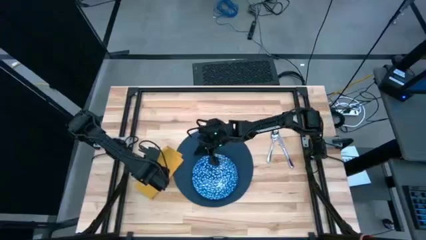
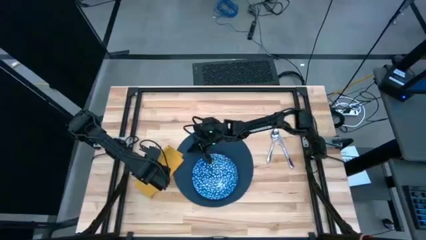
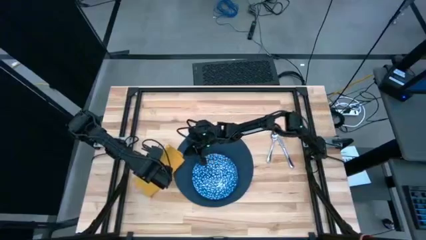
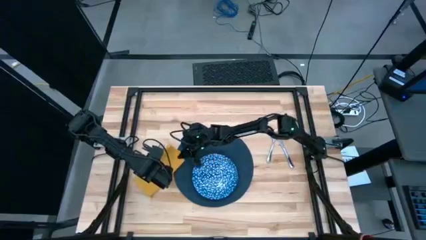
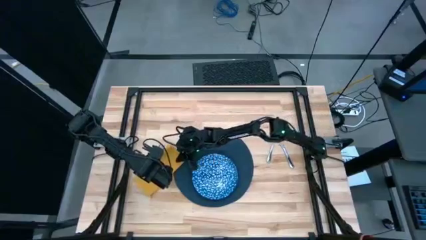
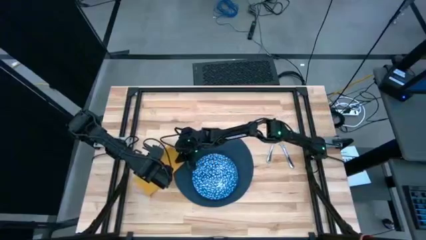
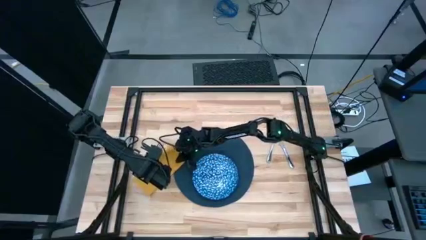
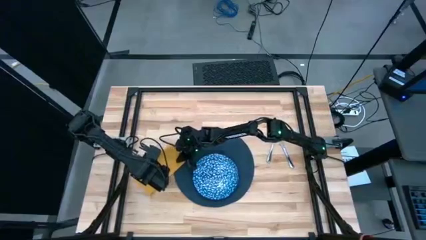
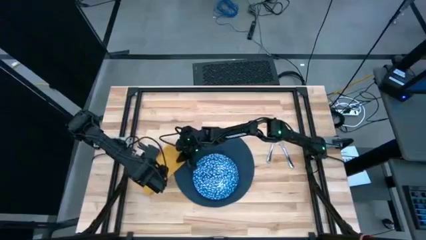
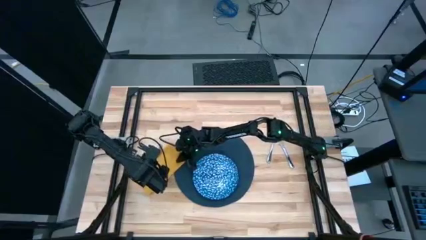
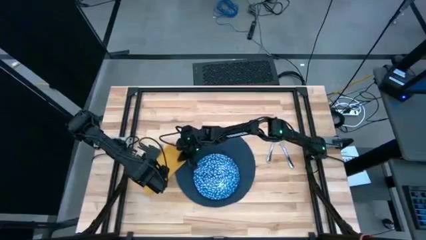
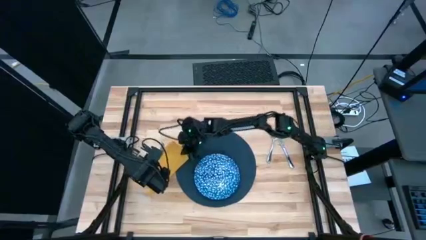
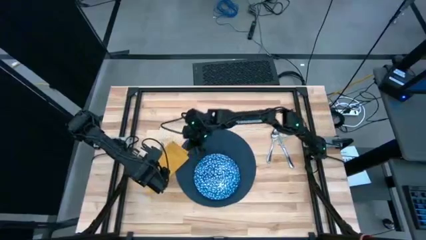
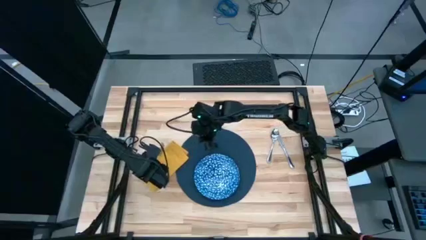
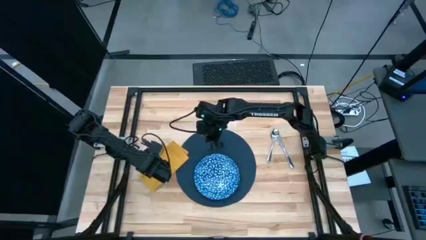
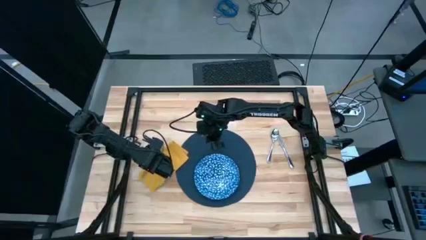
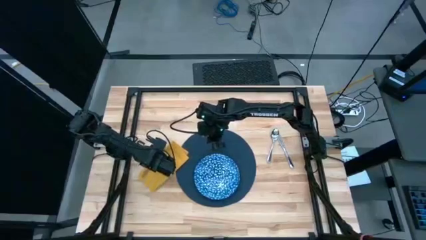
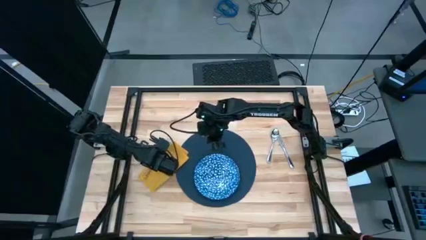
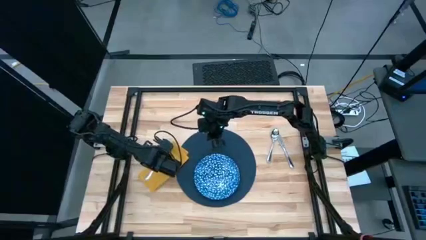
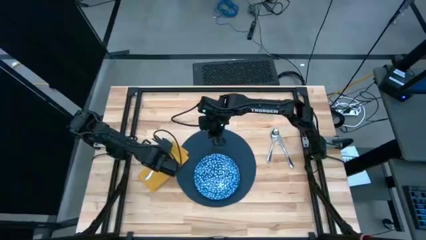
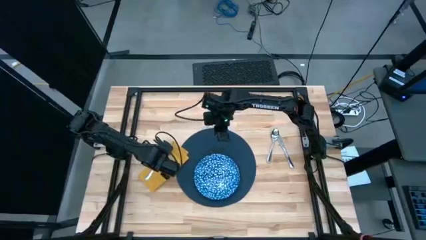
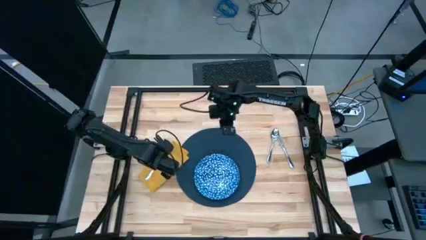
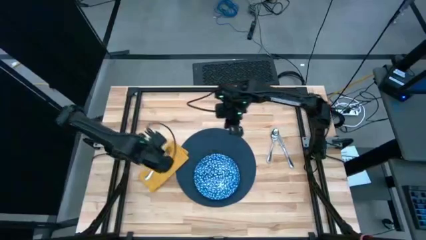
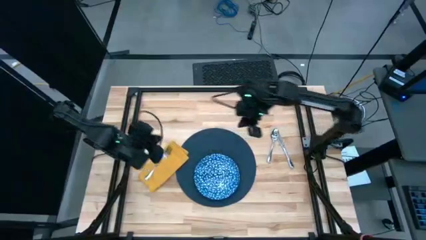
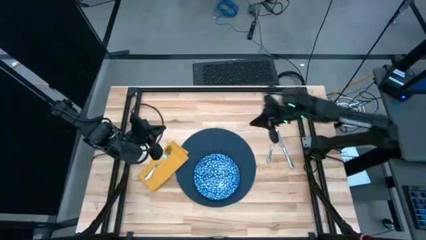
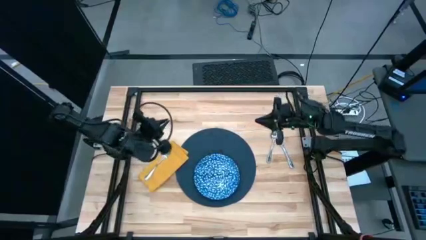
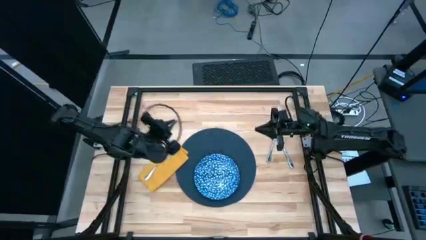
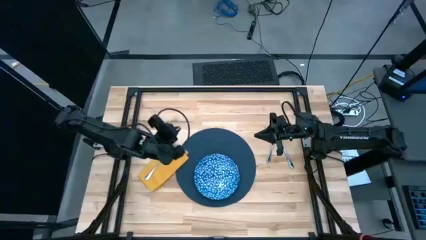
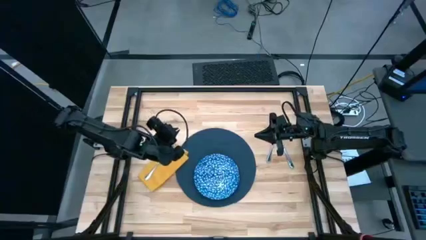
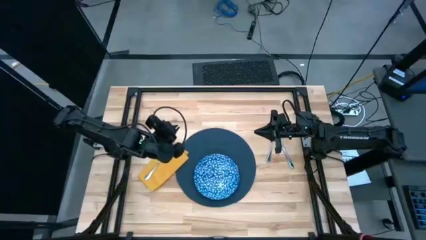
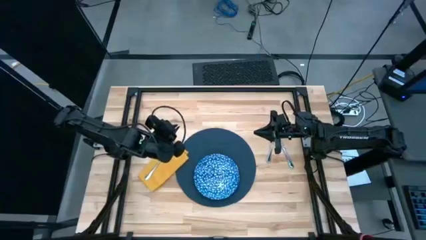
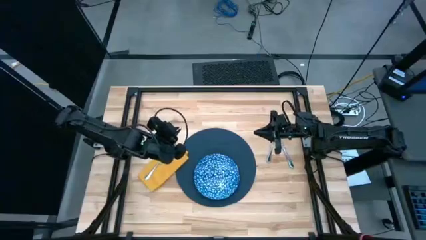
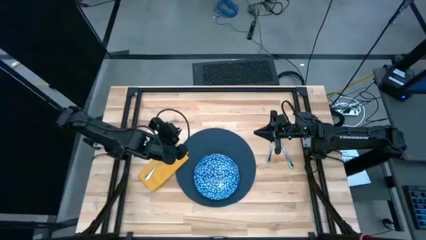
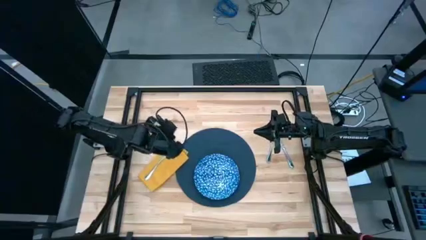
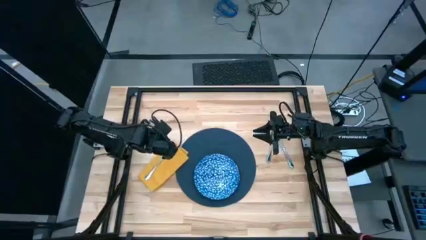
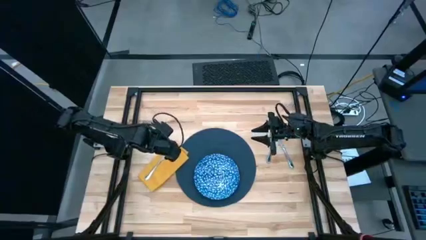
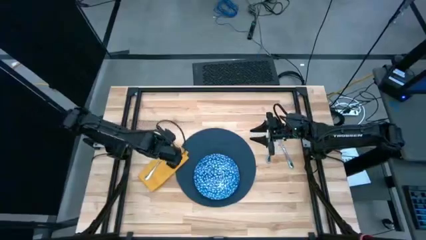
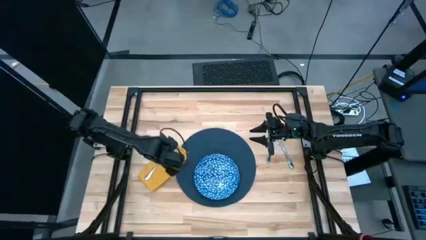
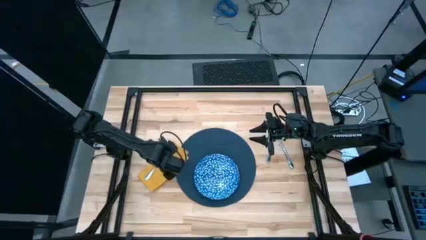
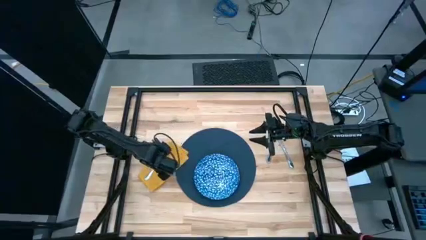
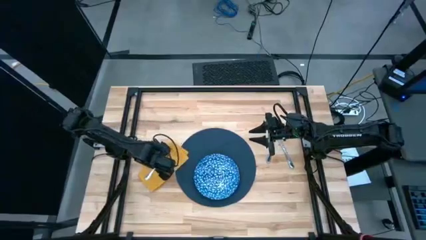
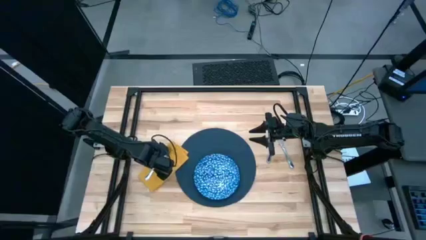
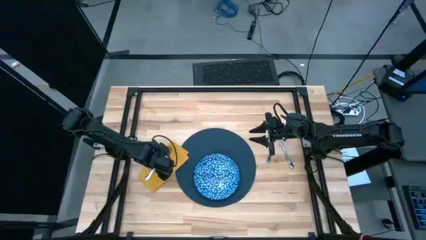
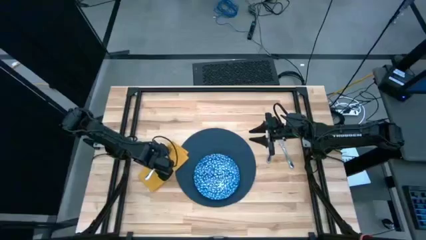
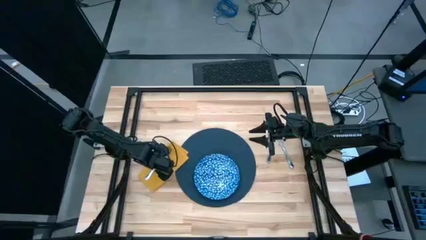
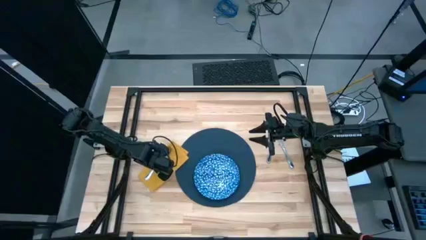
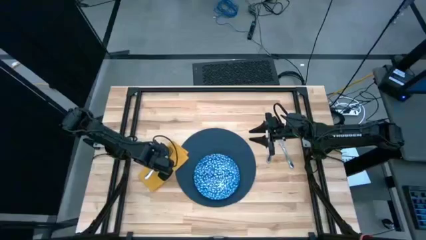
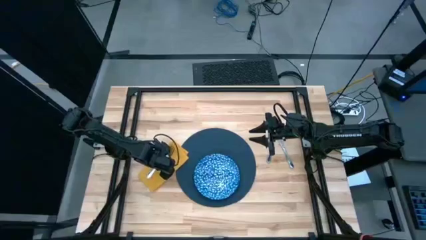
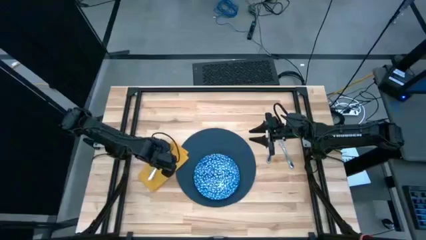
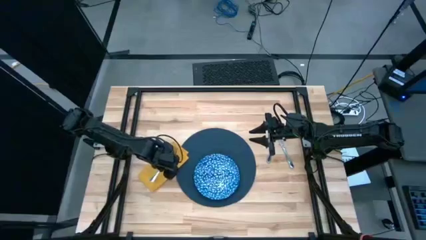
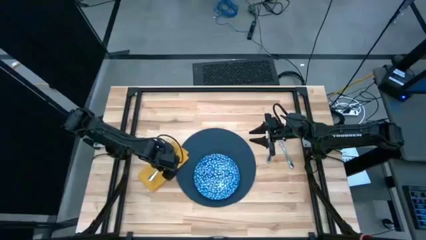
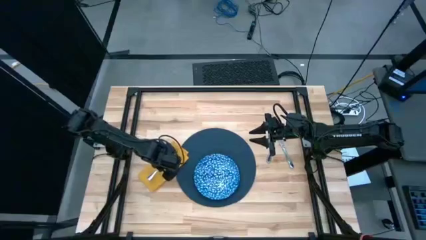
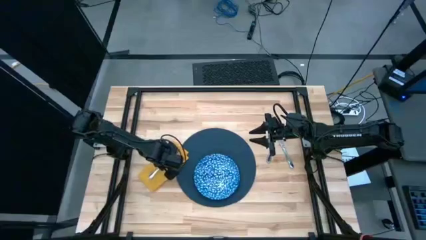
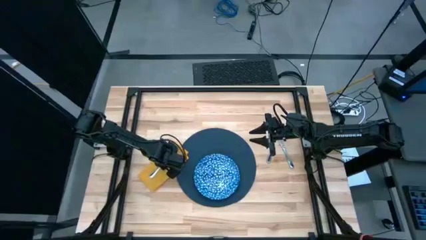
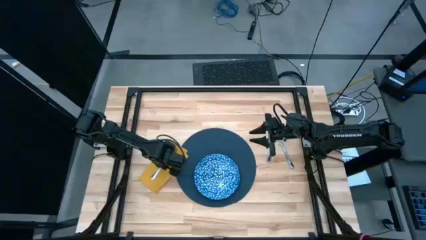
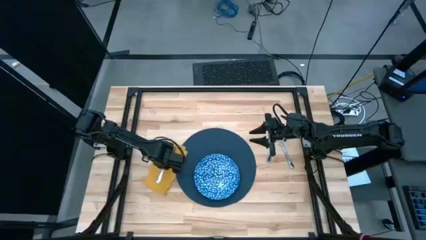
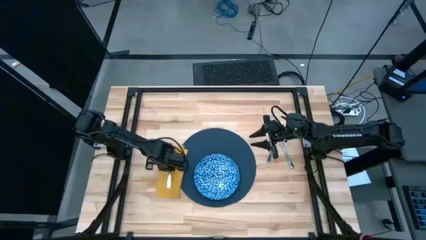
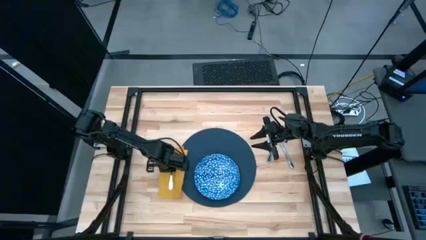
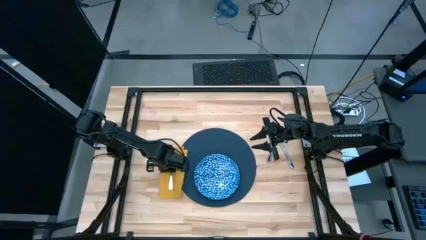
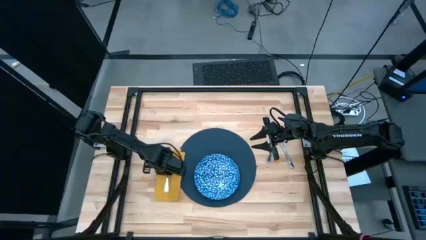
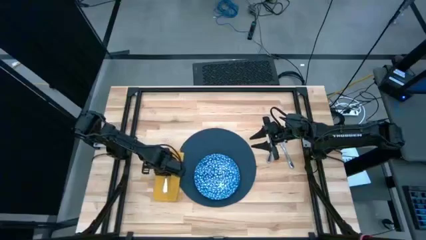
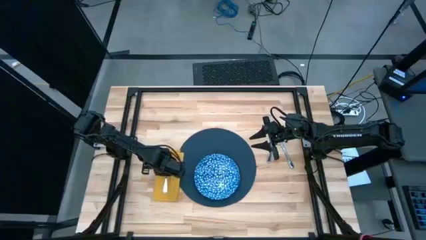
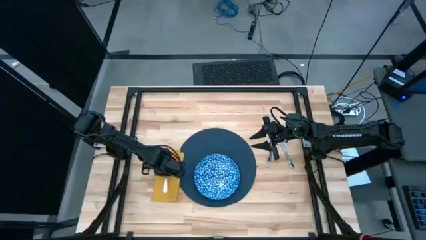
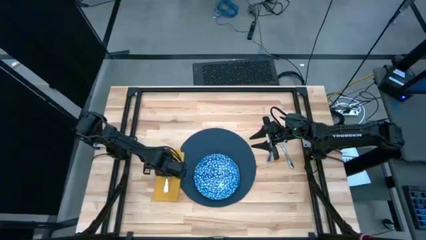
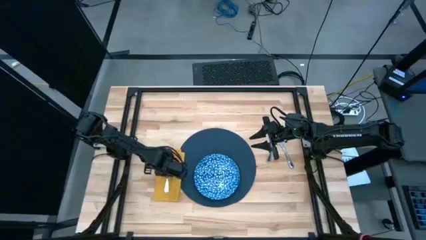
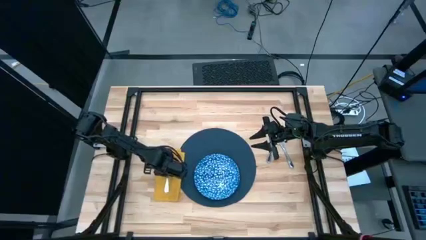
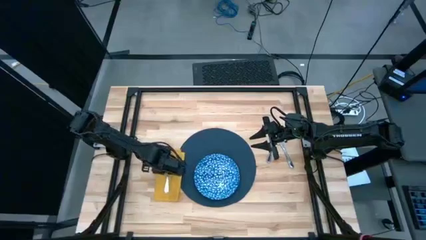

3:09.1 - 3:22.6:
Task: Set table place
Put the fork on the yellow table napkin

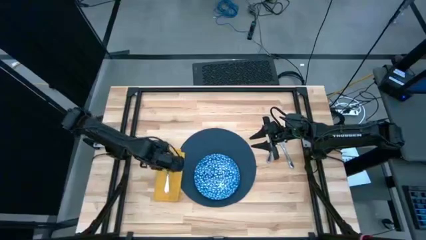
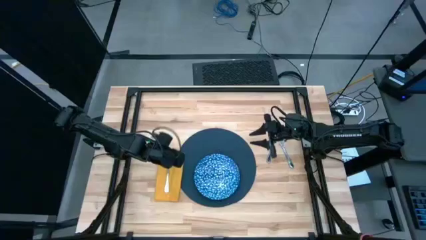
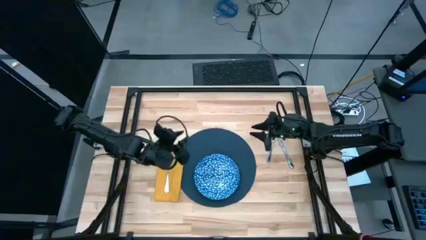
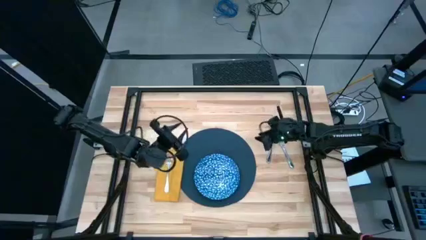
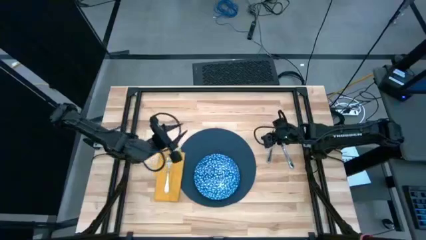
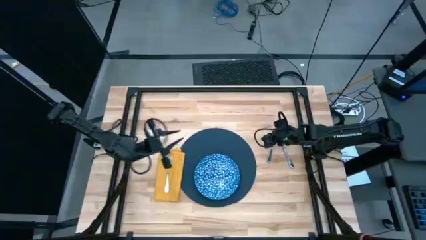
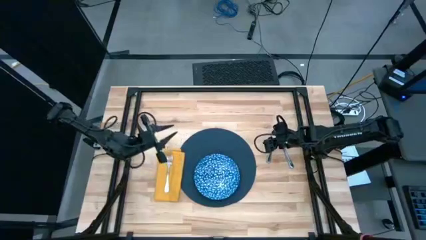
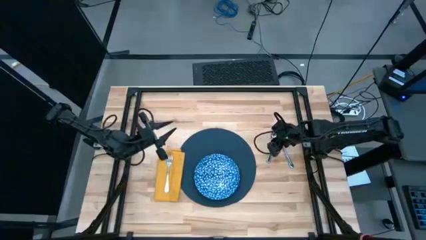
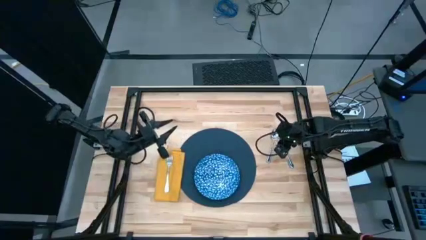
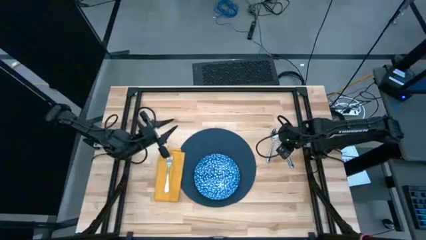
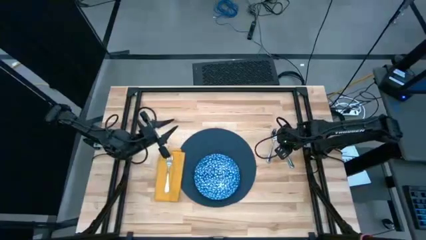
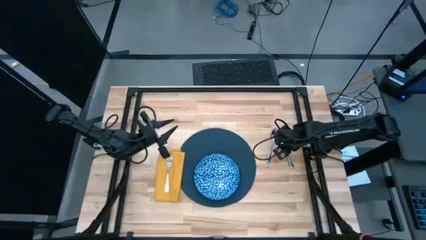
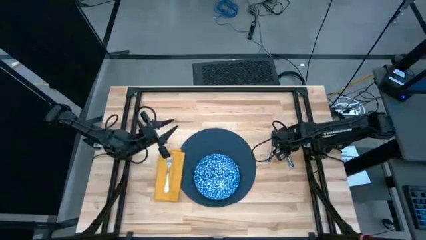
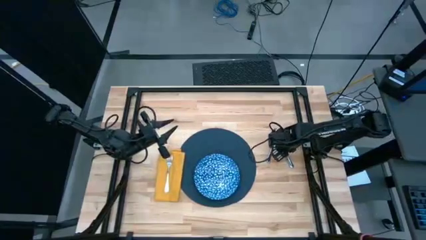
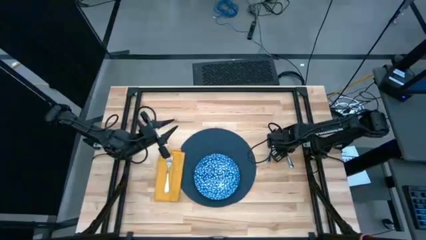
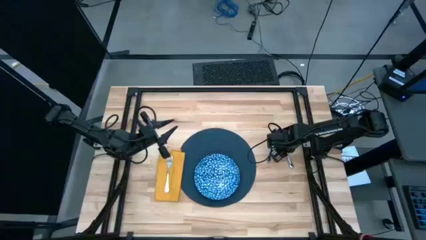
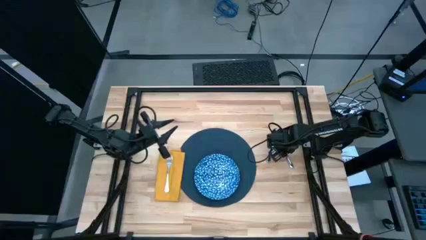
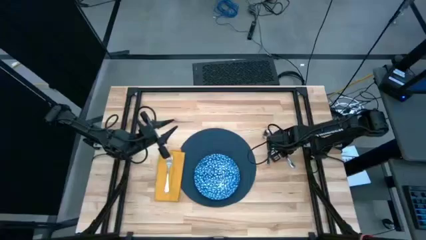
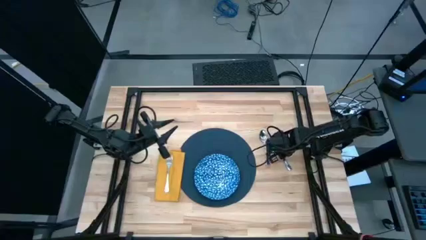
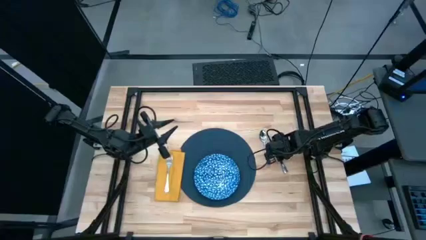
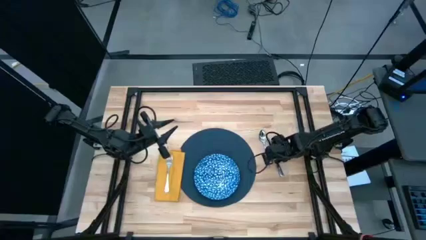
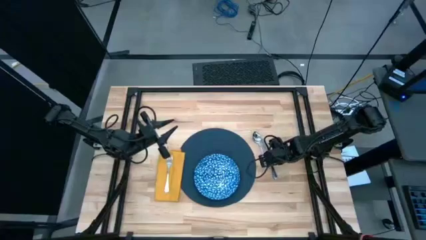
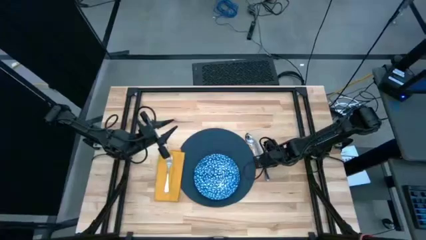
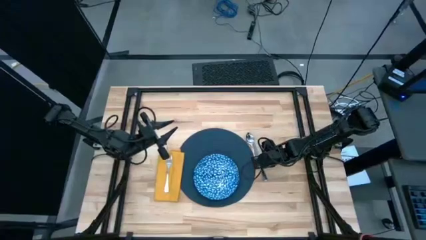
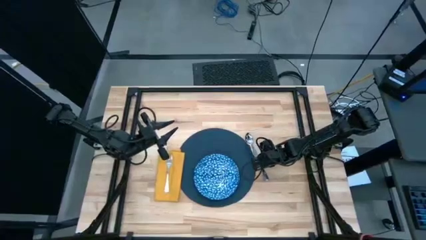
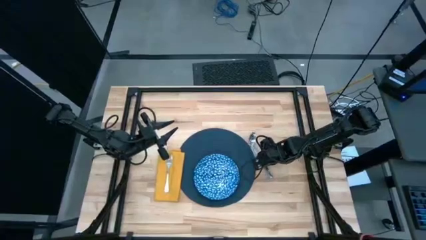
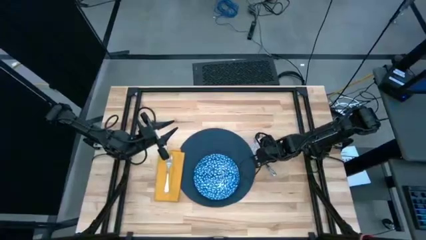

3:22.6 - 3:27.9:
Put the table knife on the right of the blue placemat
